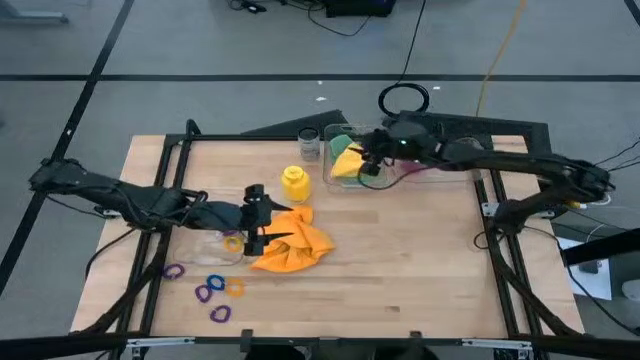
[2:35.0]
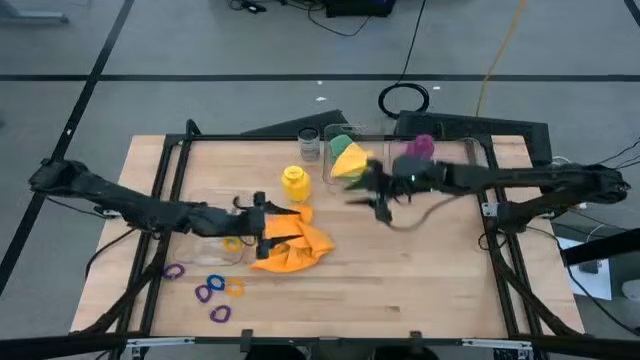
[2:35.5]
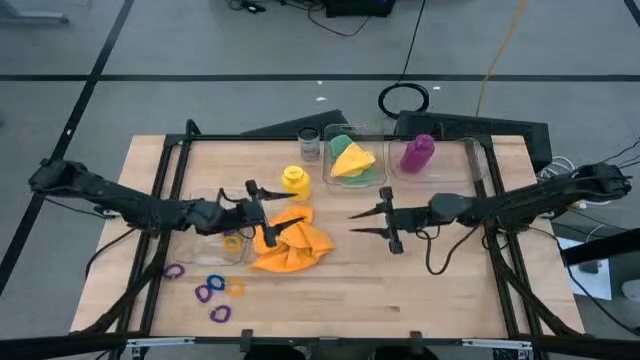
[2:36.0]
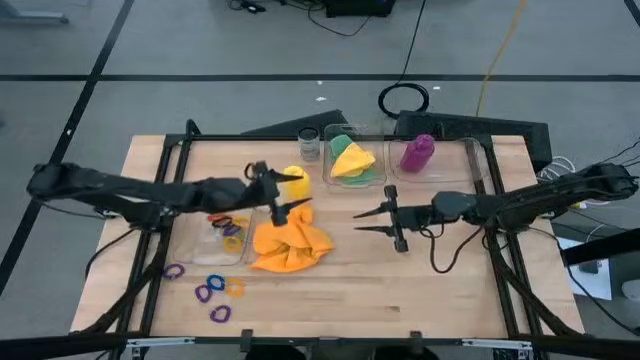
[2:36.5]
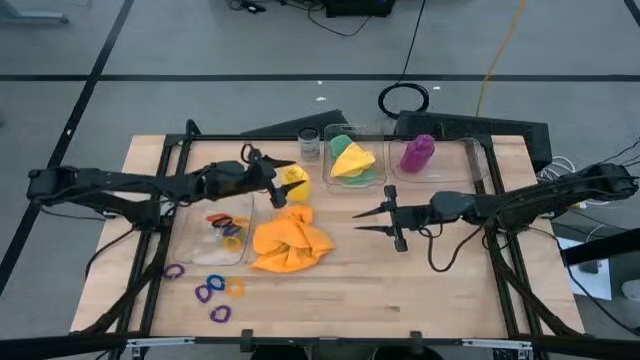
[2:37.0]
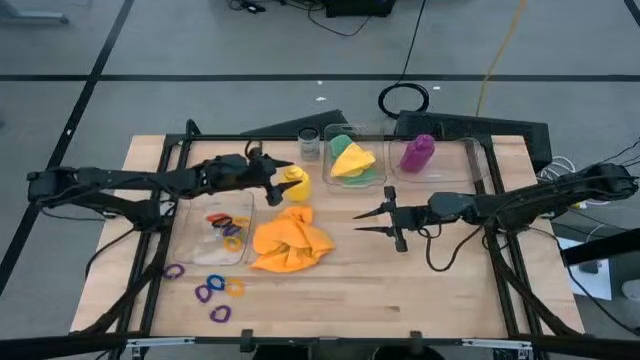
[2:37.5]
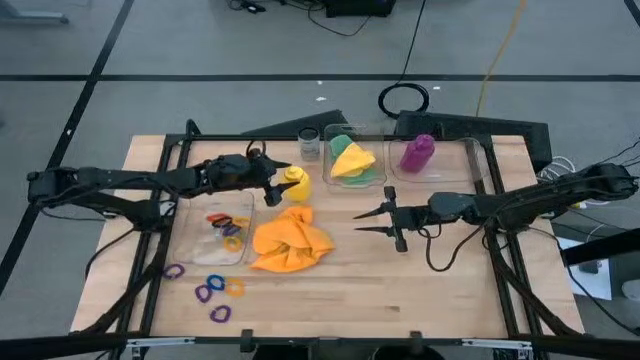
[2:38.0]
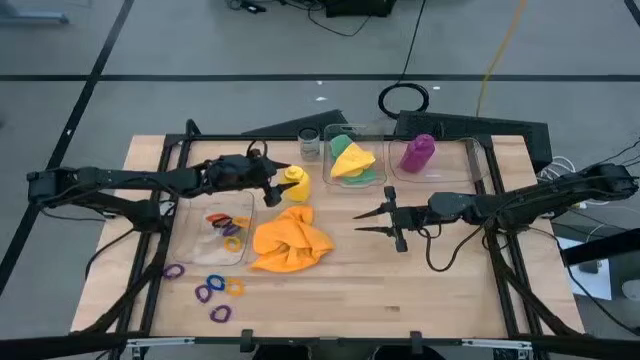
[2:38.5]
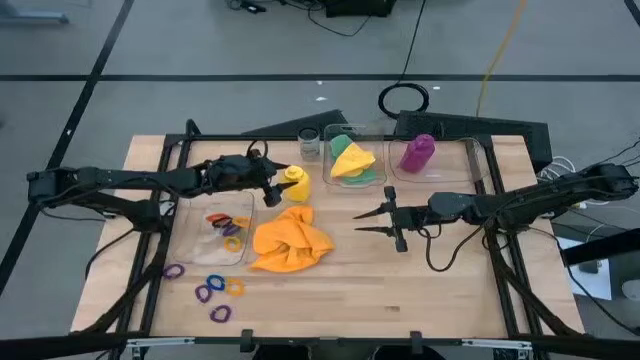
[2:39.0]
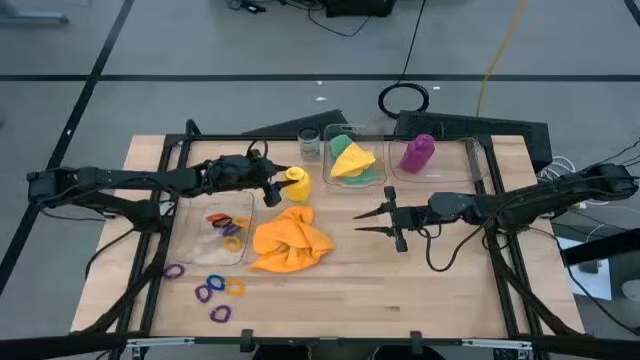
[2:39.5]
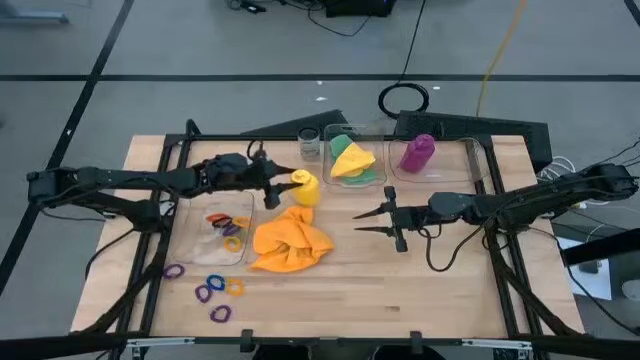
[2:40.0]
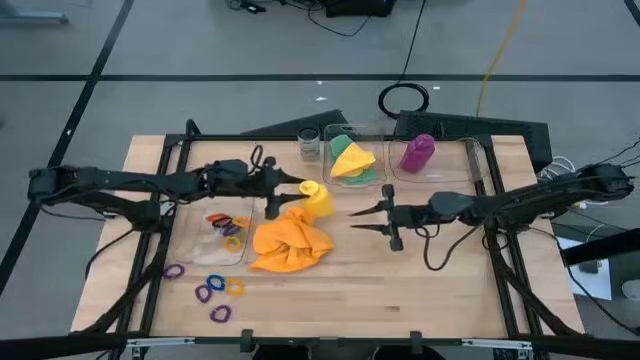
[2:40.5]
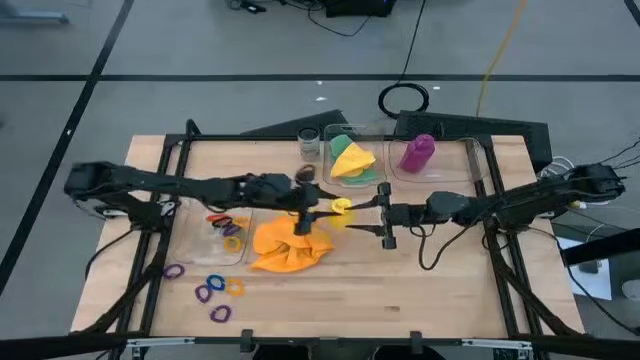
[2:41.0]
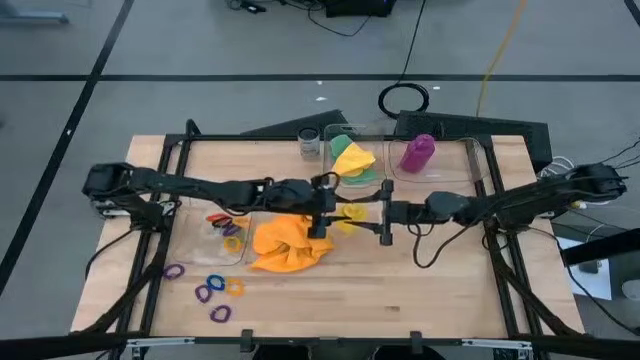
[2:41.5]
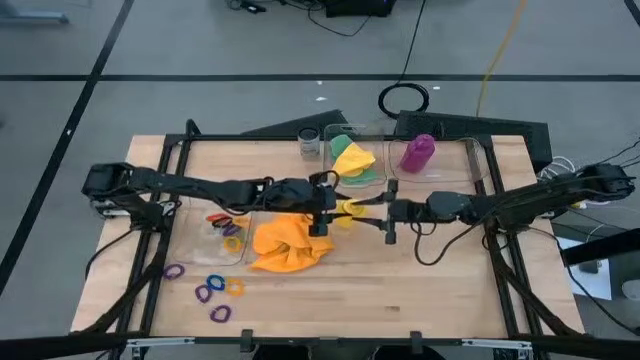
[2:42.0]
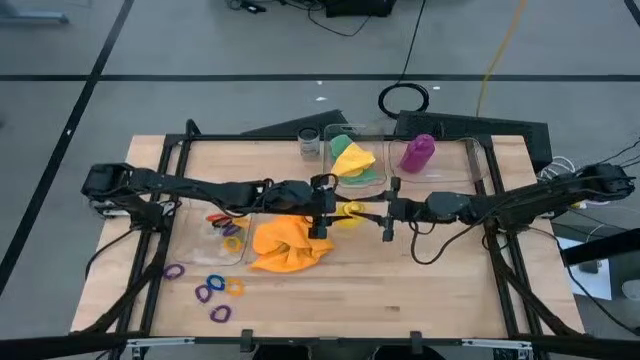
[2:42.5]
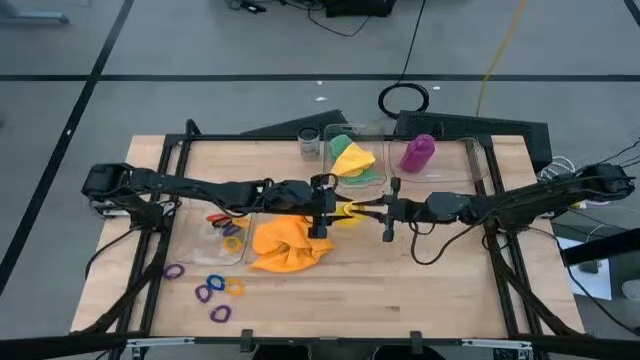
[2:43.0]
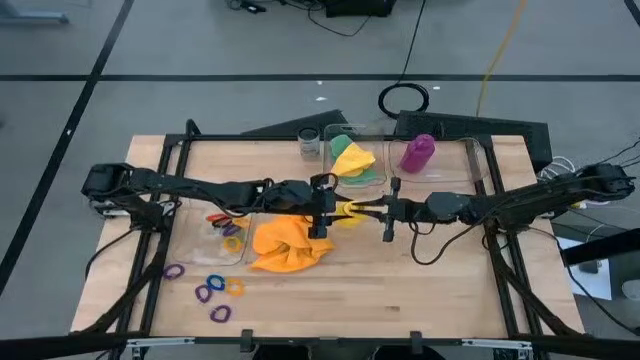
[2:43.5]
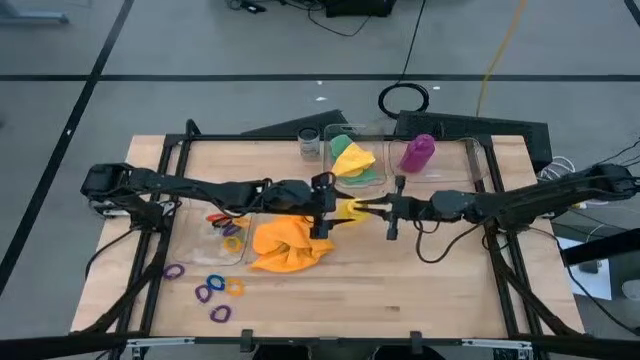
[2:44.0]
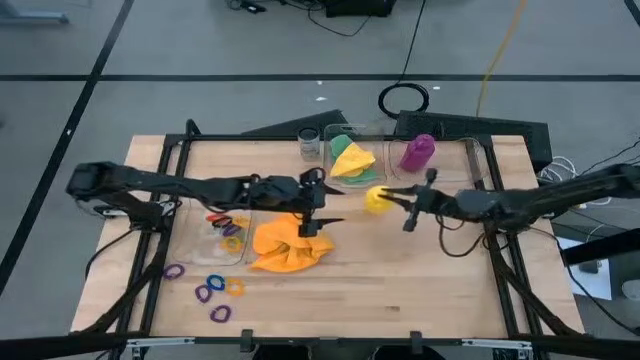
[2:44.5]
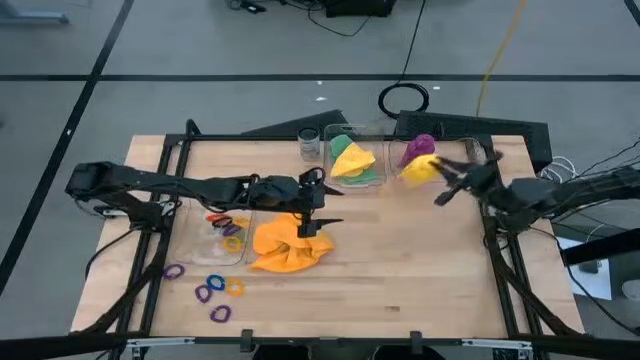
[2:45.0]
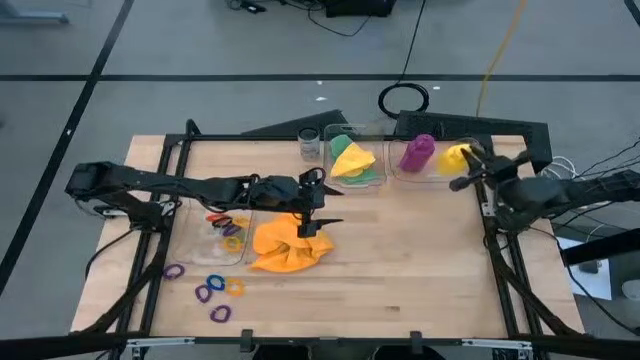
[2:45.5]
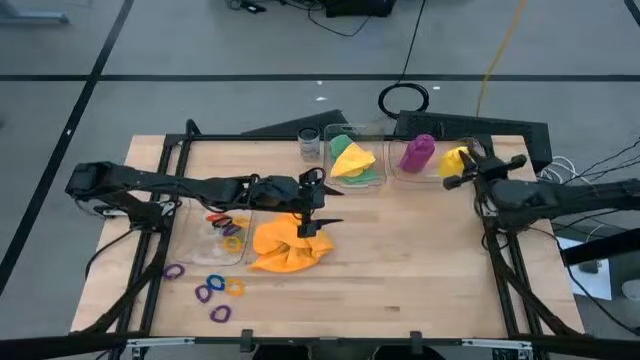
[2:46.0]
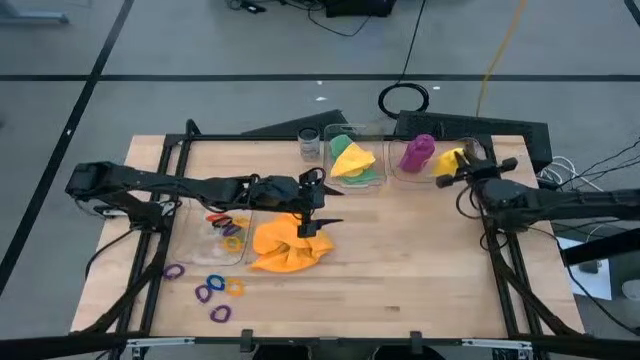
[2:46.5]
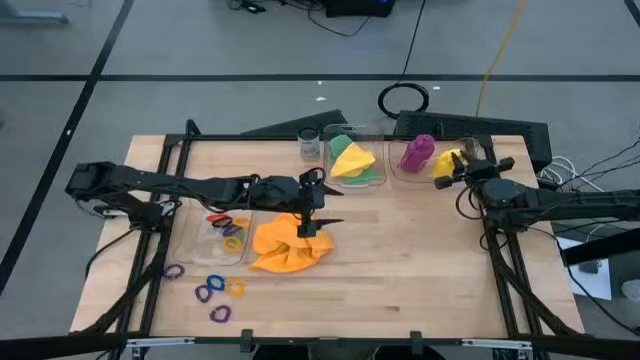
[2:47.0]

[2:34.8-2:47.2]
Task: Pick & Place Sports Items
Put the yellow water bottle into the top right transparent bin

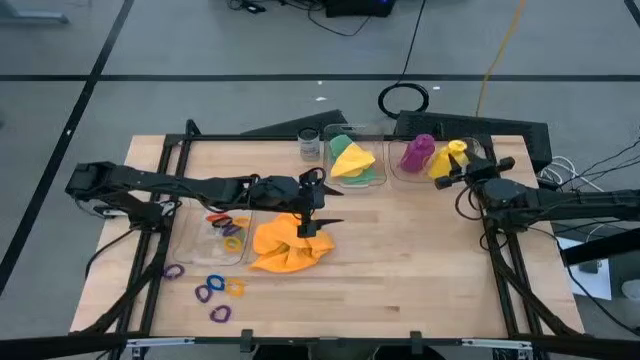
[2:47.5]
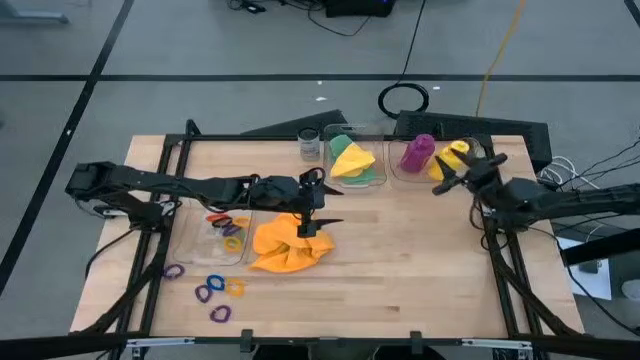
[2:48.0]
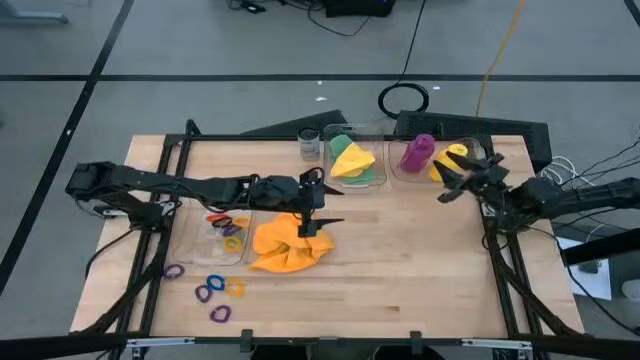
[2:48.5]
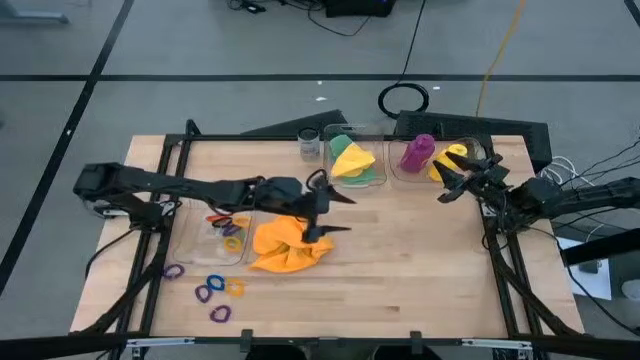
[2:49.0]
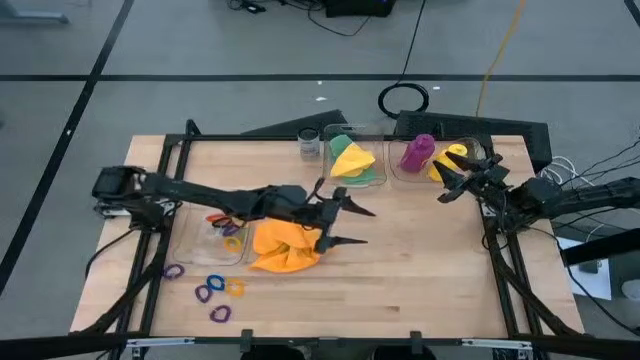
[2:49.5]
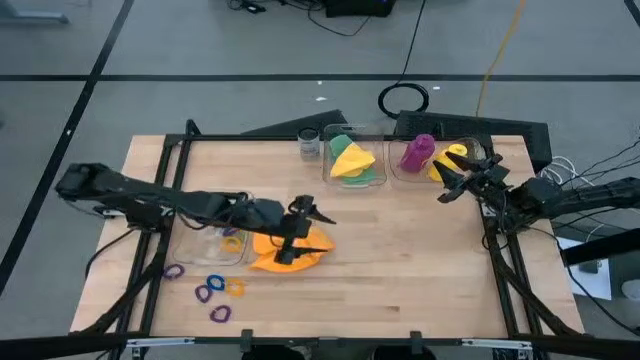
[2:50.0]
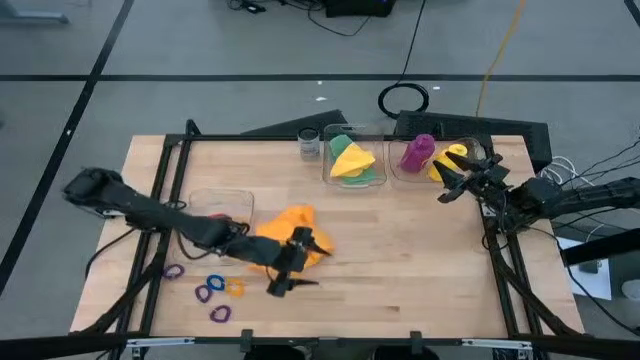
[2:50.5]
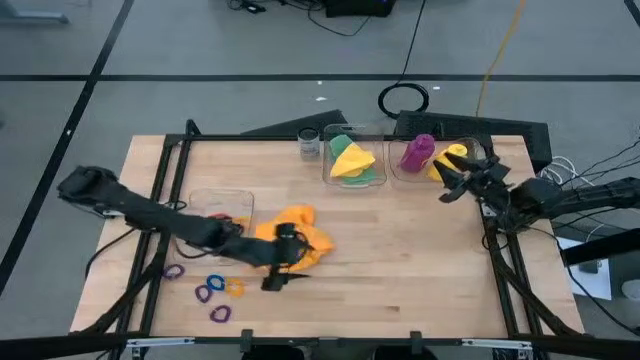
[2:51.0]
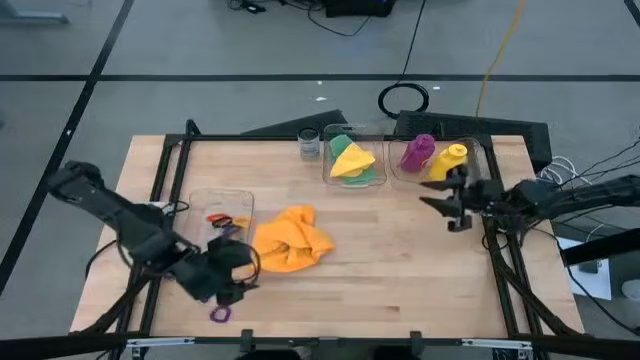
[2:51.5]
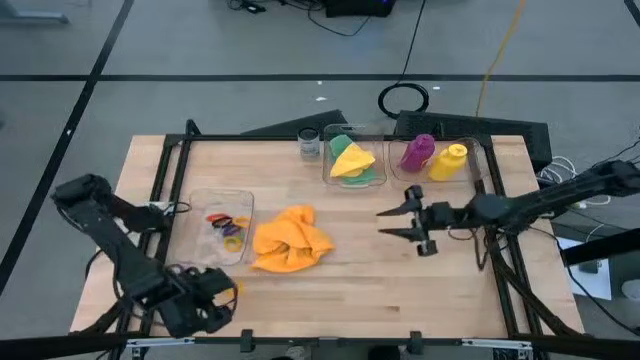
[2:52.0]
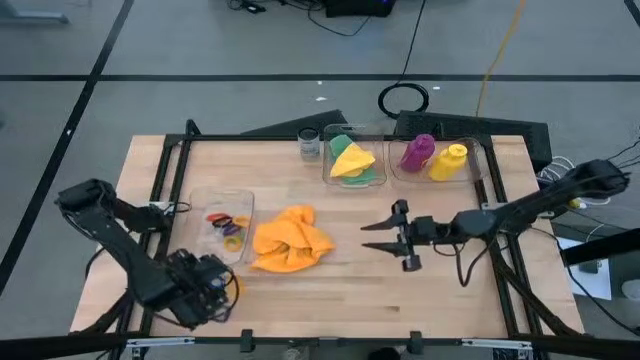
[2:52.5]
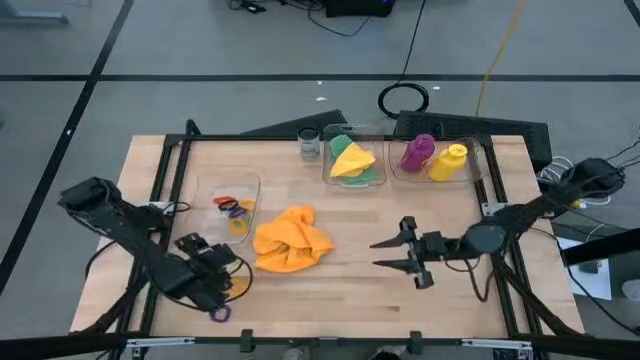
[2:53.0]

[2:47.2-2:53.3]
Adjust the bottom transparent bin

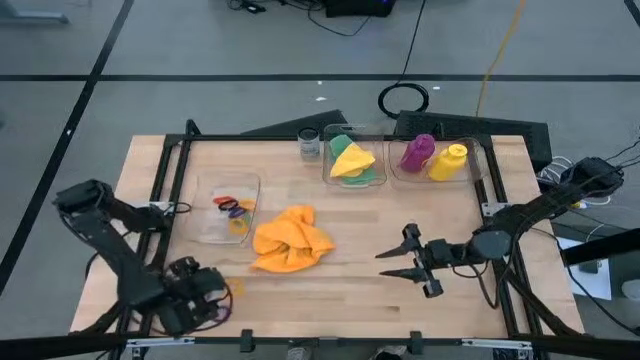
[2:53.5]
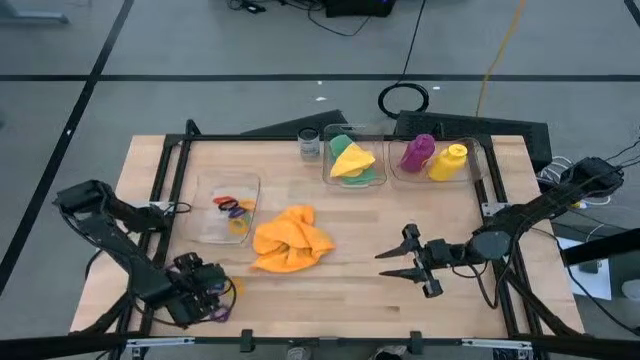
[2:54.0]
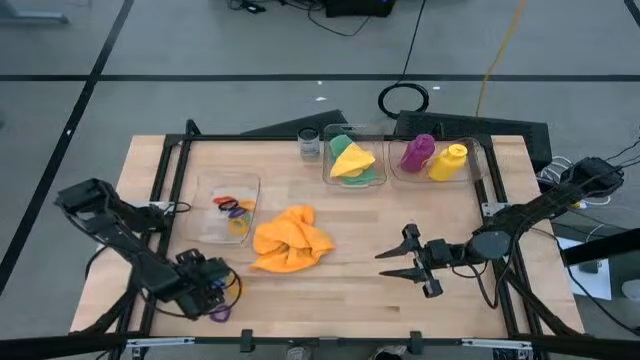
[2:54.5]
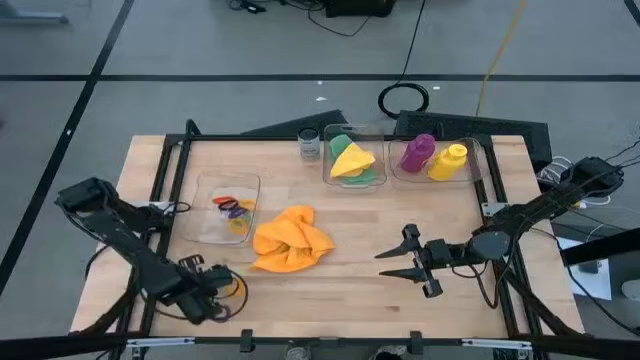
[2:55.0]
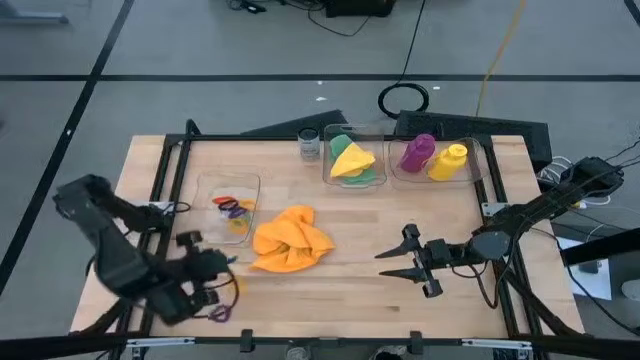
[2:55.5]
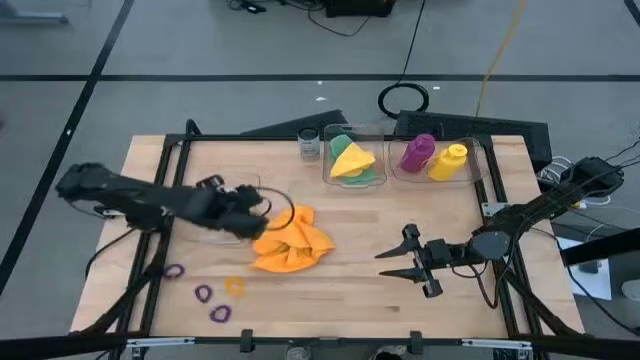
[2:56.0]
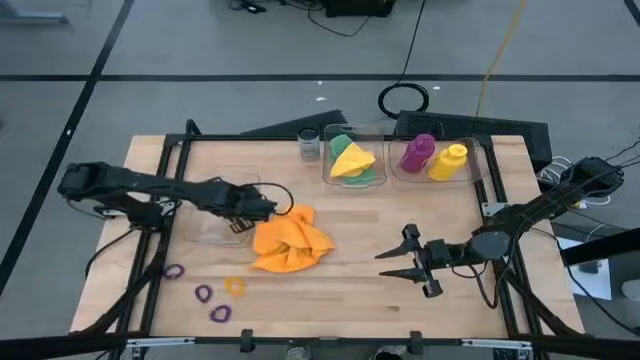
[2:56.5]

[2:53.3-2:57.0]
Put the blue spring keychain into the bottom transparent bin
